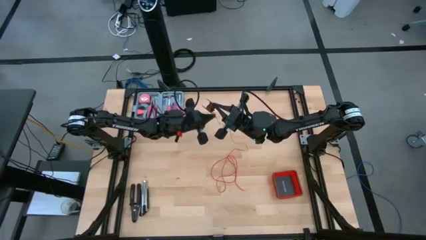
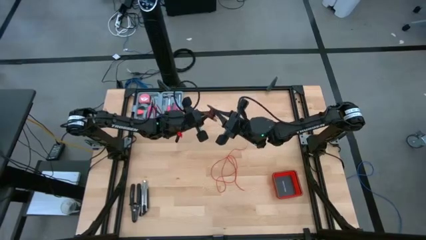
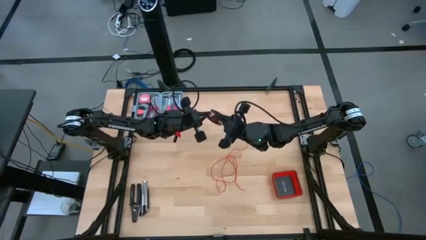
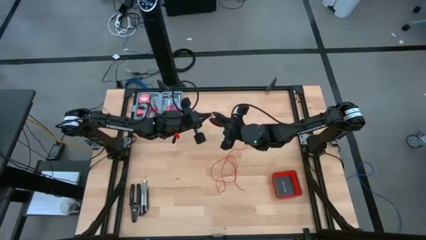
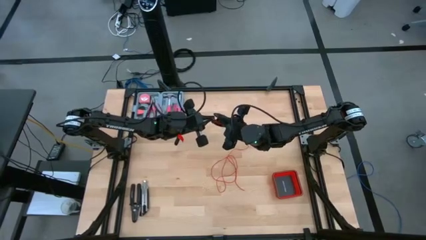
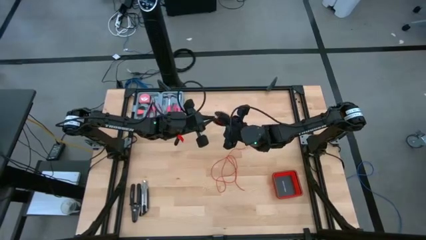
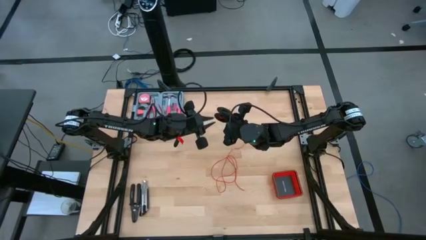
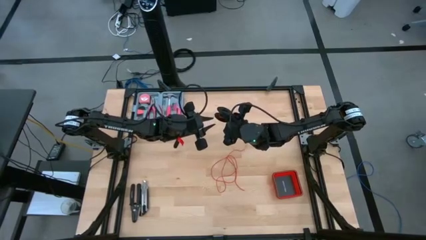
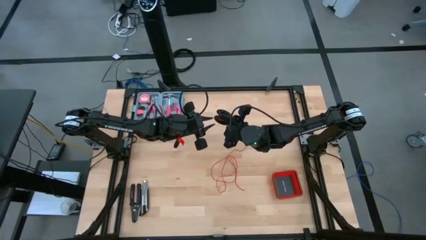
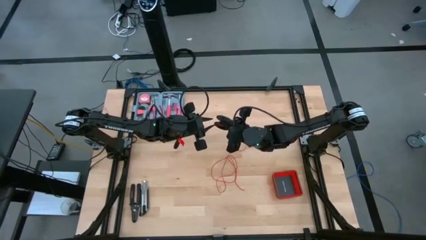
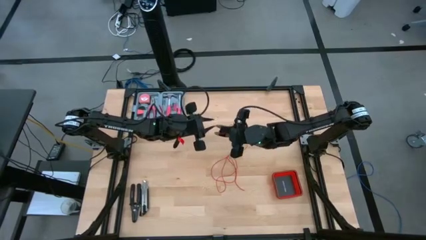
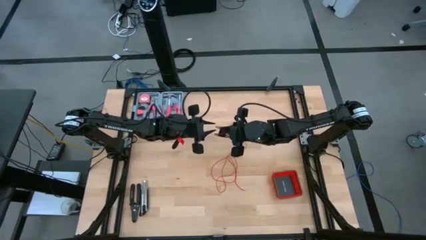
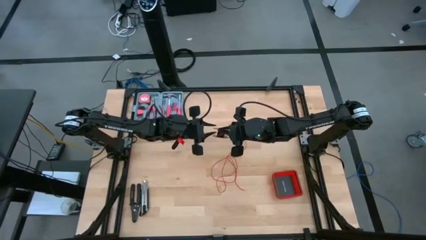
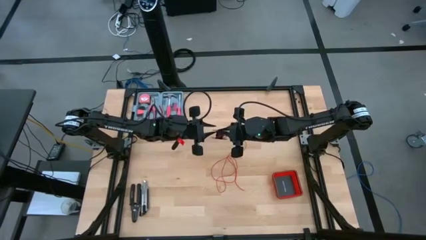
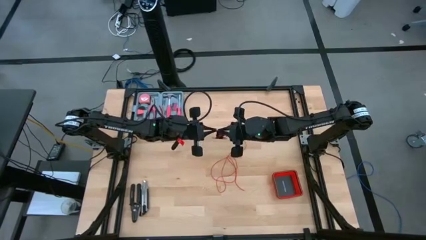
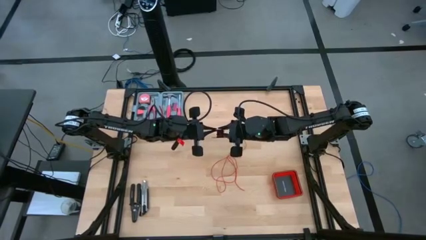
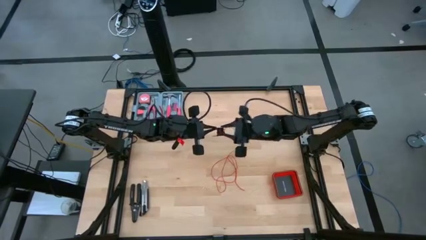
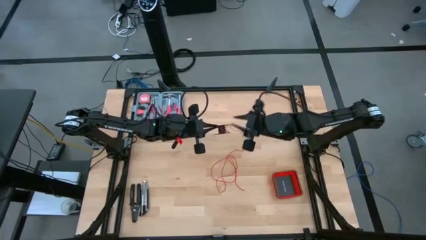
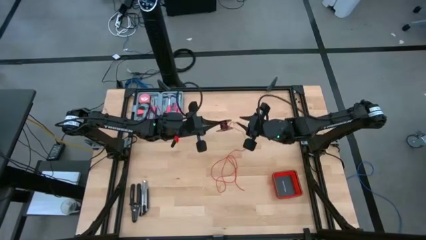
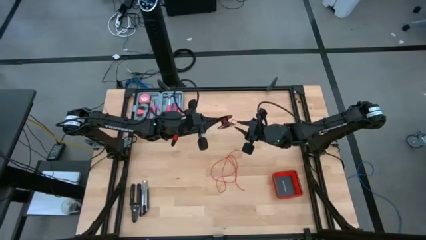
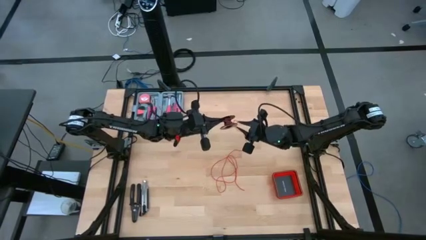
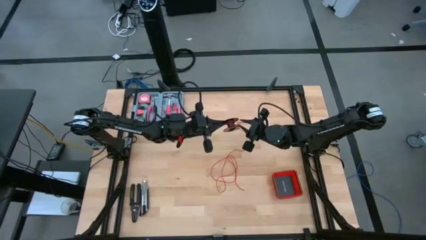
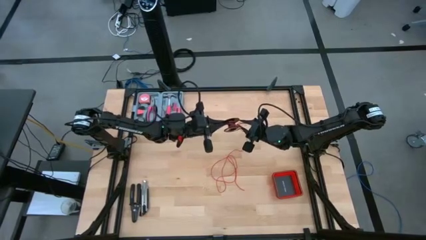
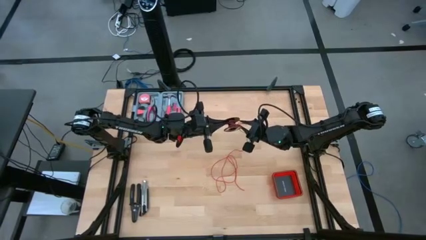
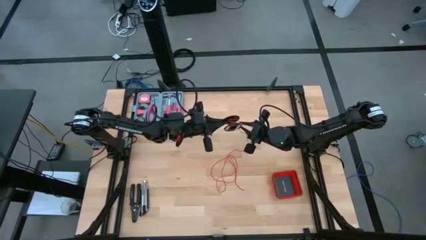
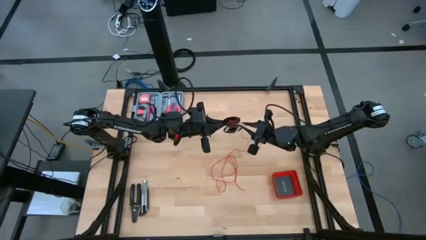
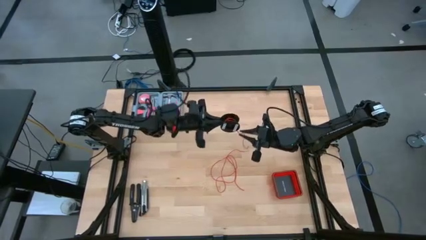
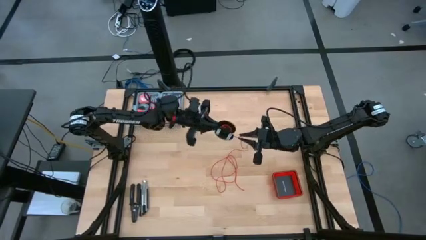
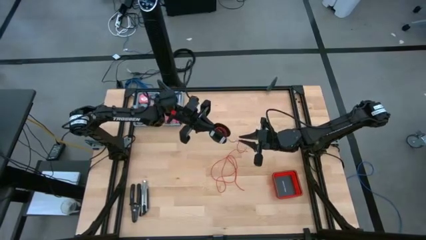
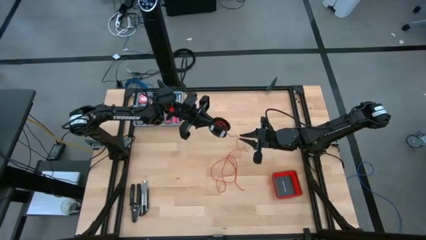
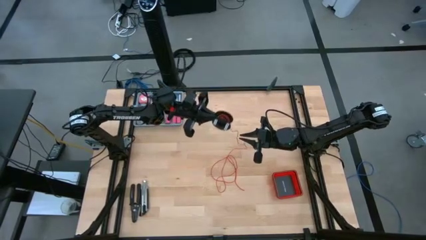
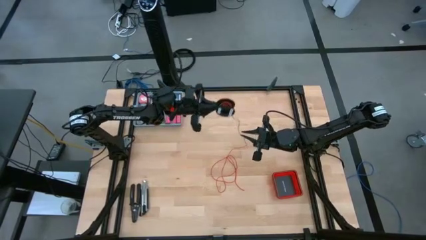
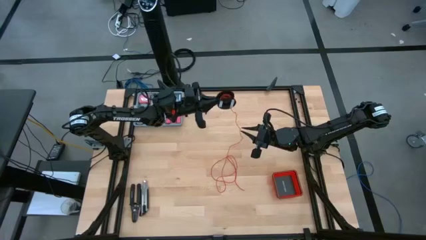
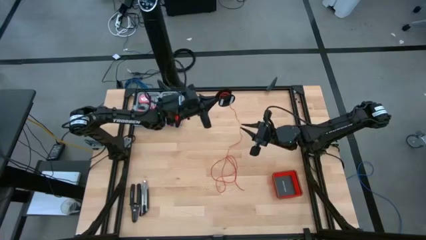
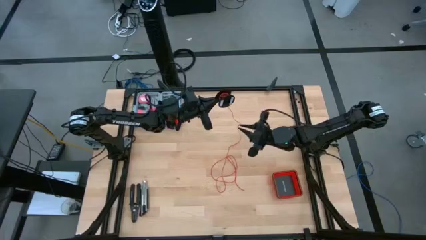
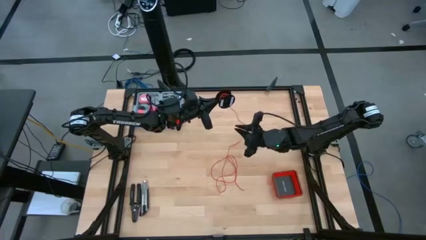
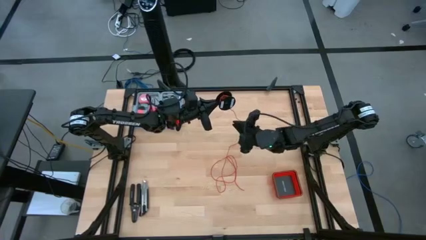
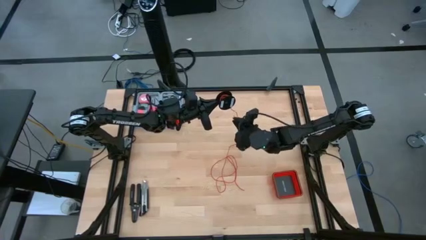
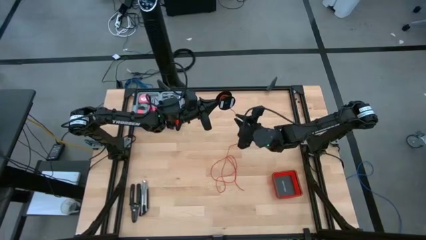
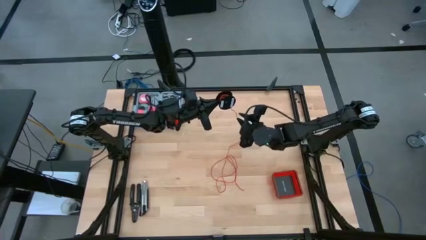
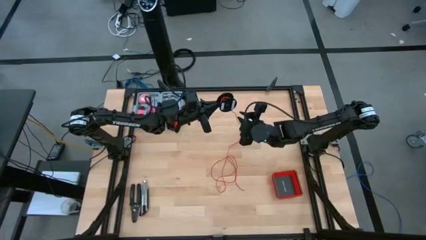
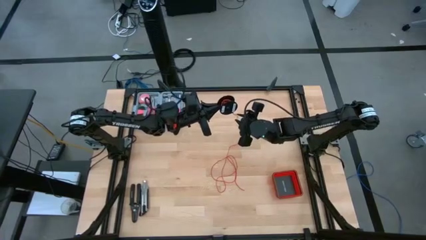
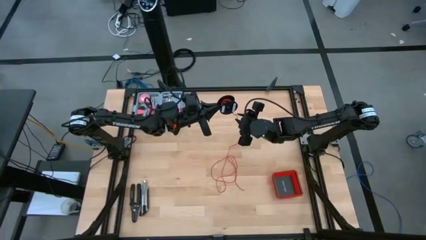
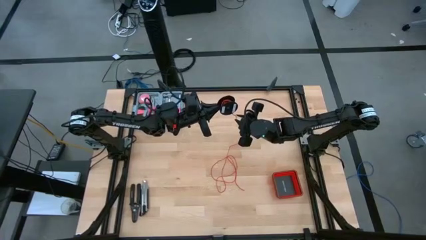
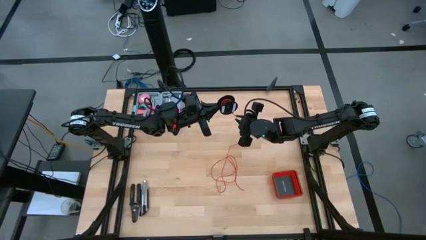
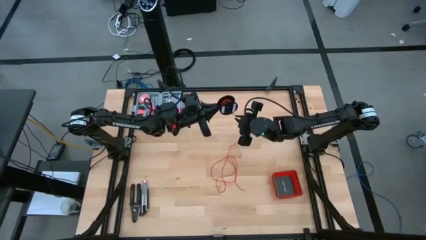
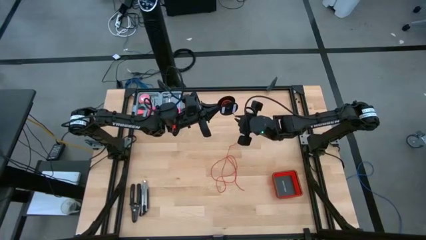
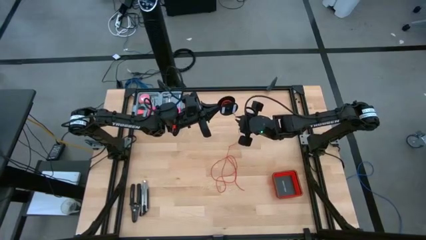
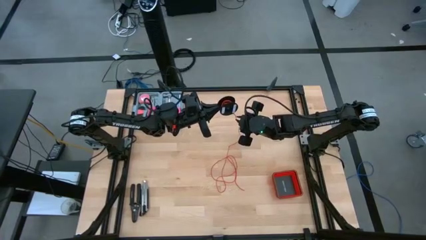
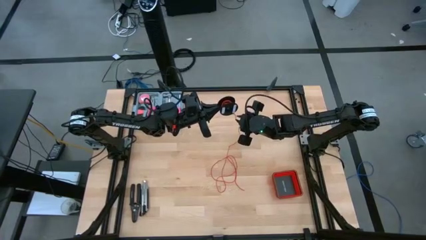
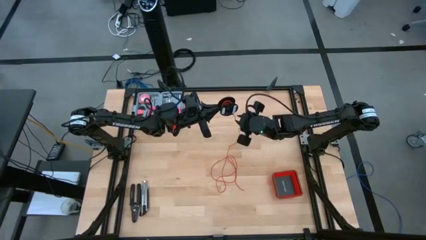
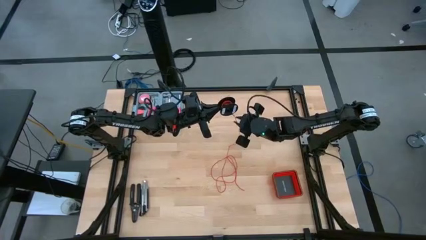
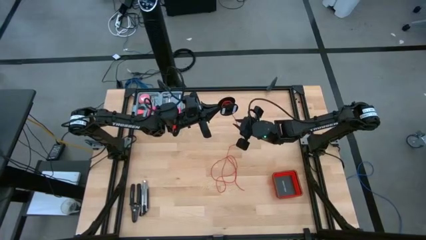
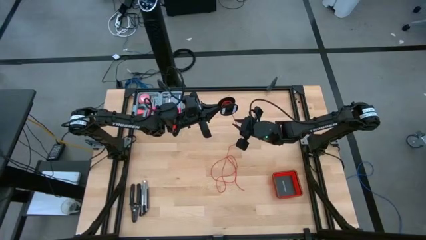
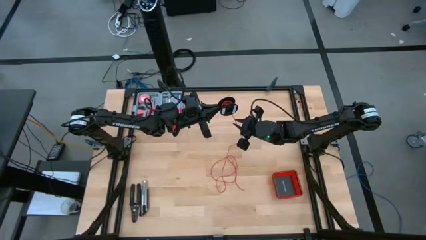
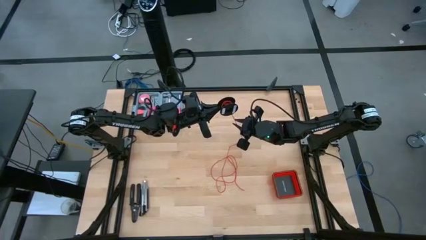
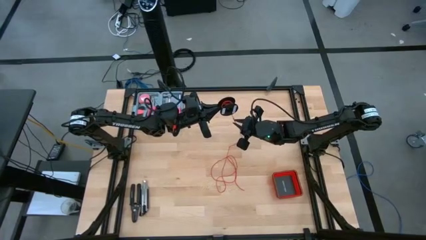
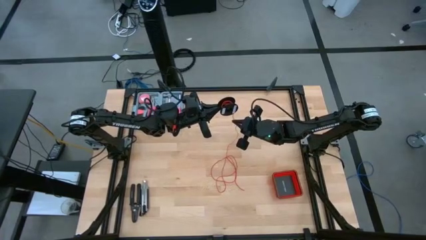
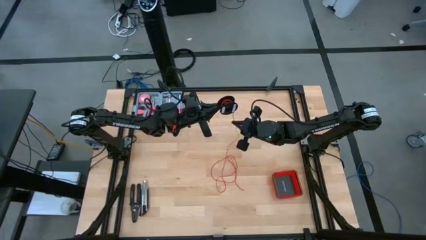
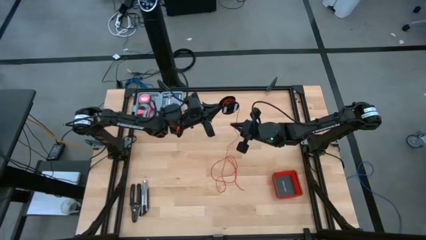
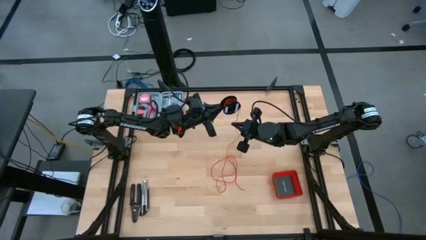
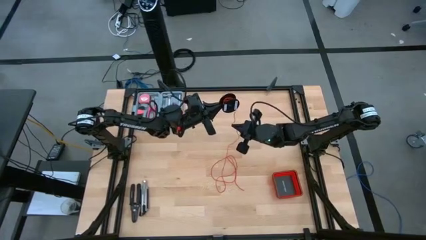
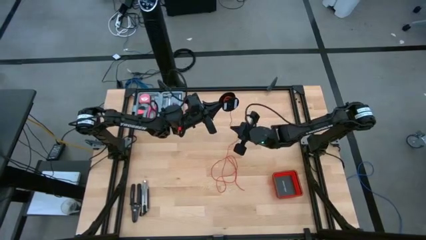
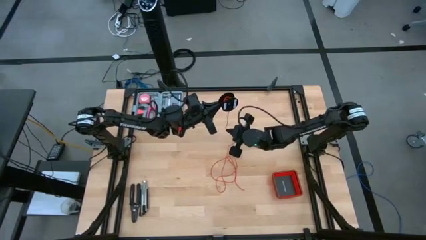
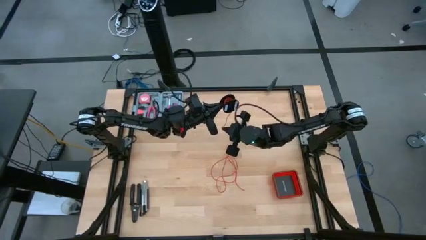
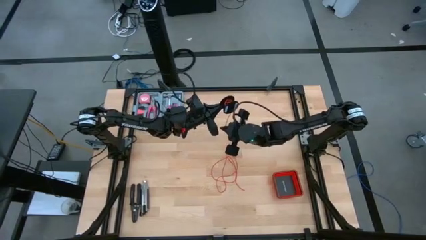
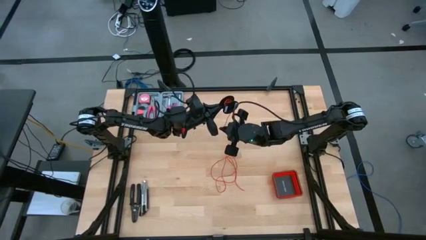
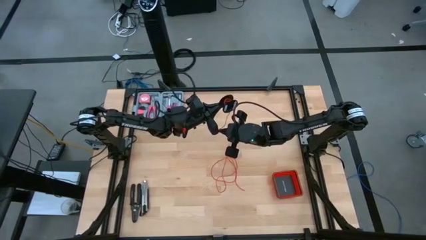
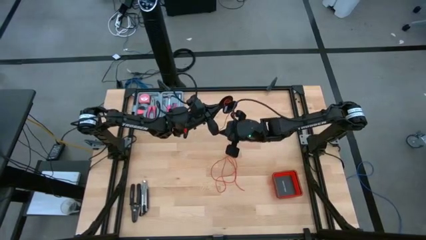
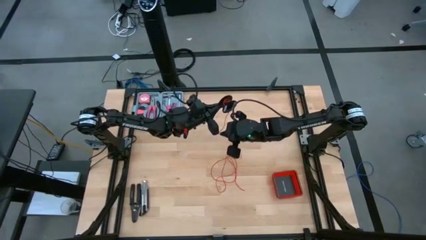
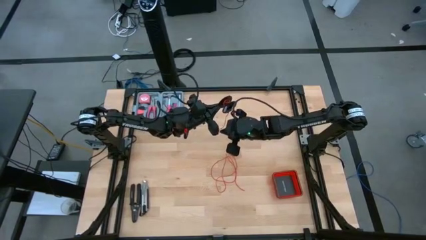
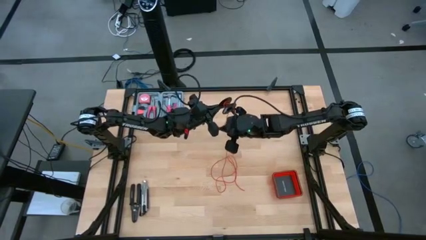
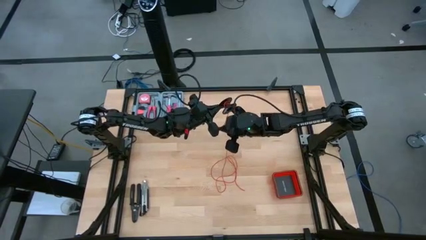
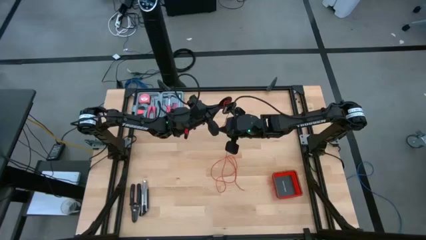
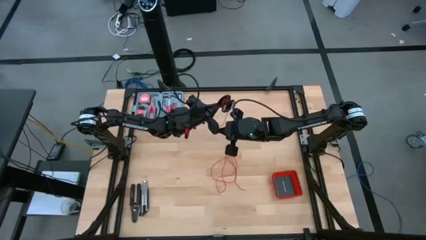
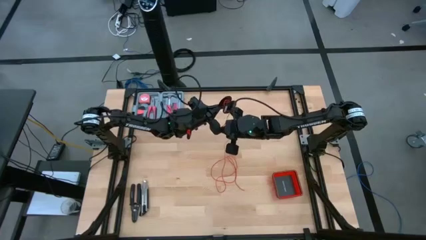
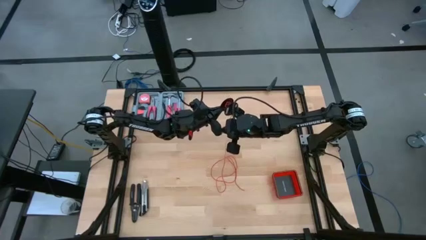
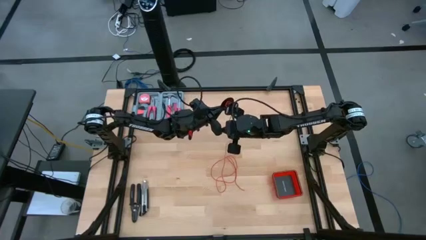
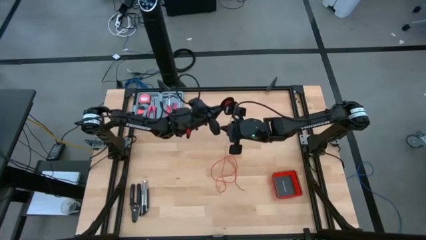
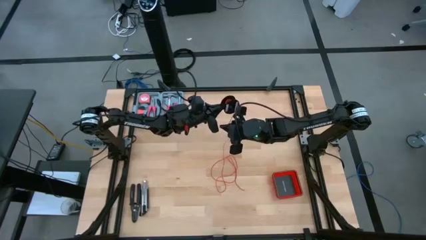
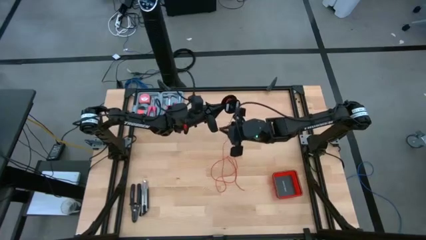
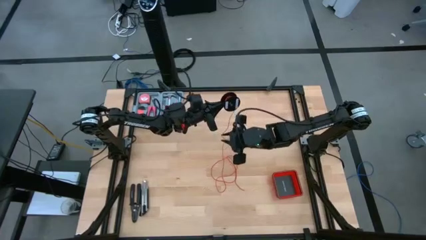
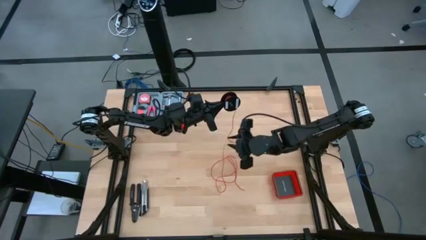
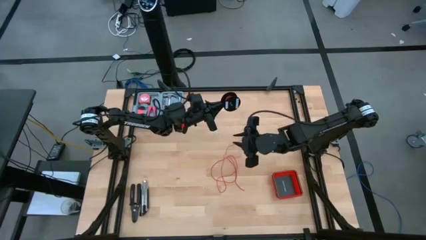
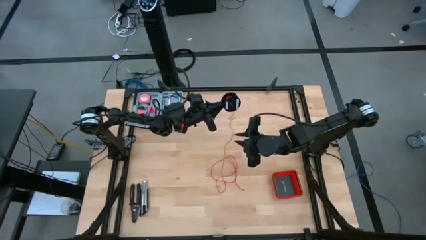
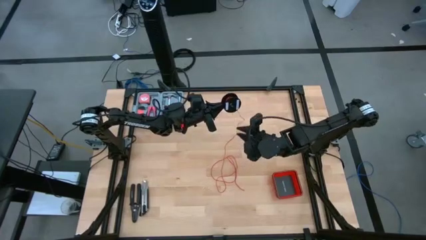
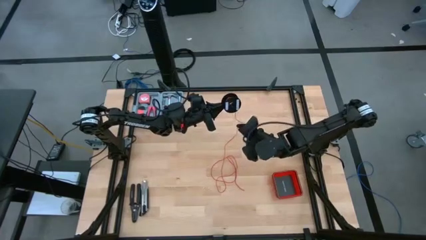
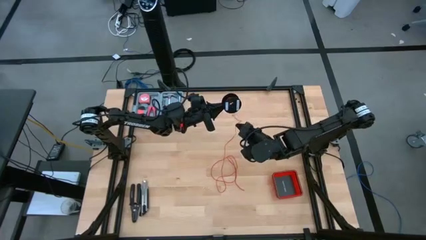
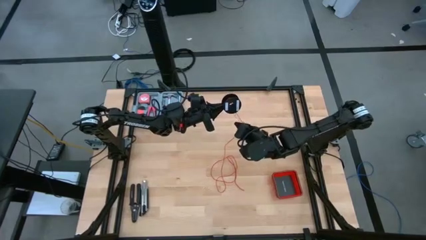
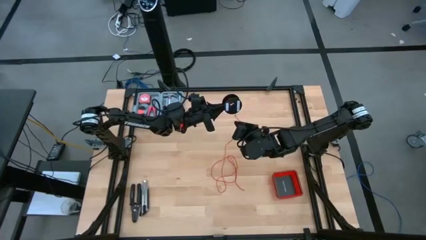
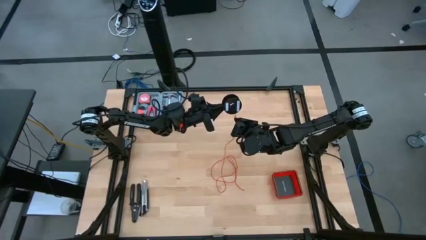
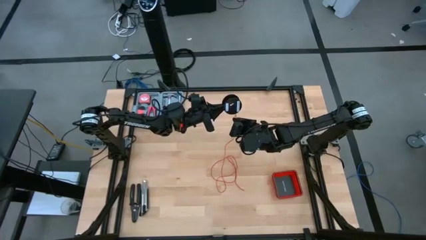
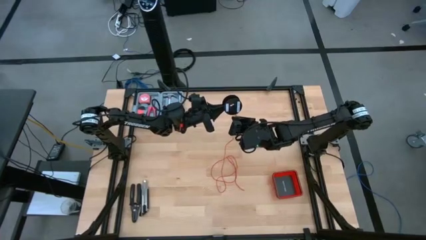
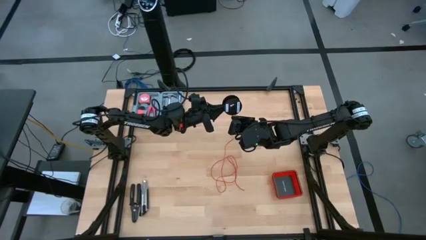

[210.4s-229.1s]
Task: Coil cords
Coil the red wire onto the spool
